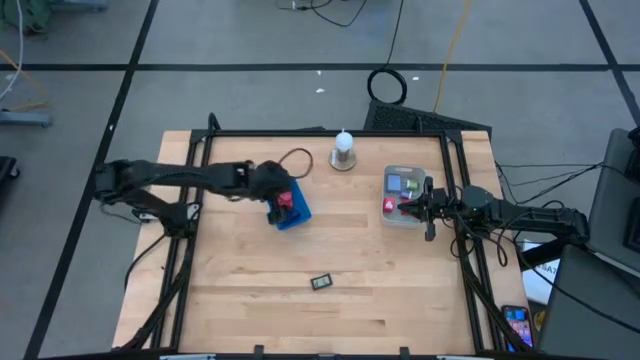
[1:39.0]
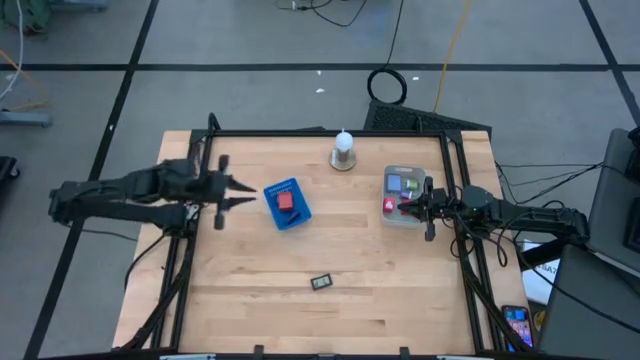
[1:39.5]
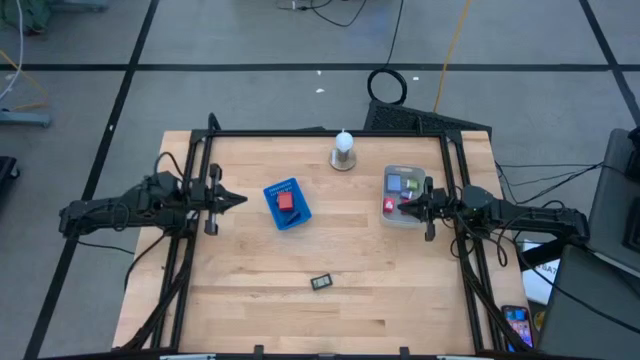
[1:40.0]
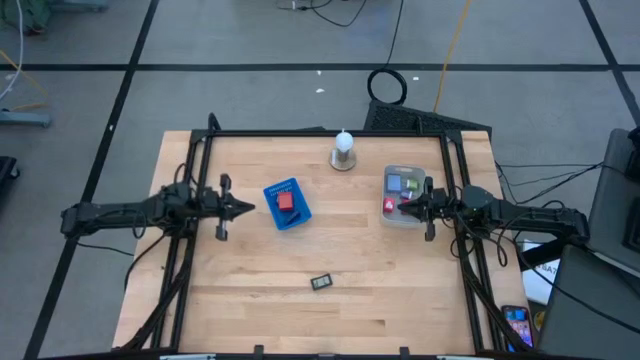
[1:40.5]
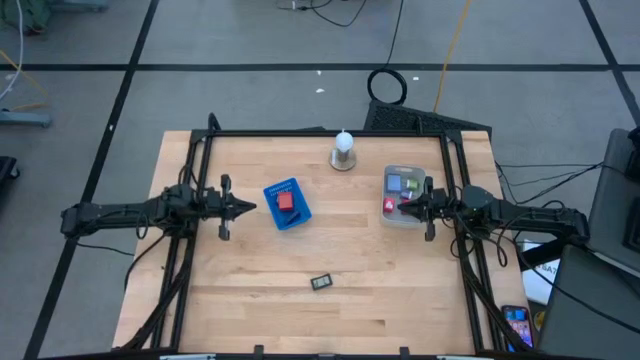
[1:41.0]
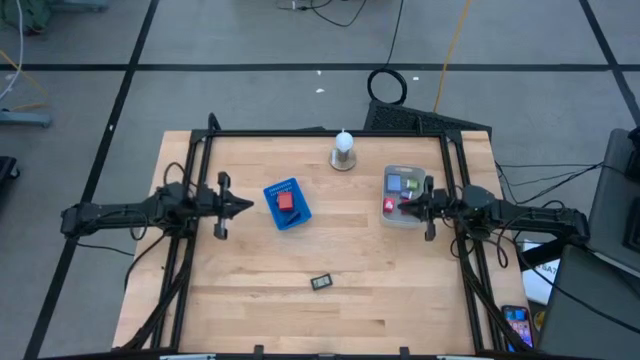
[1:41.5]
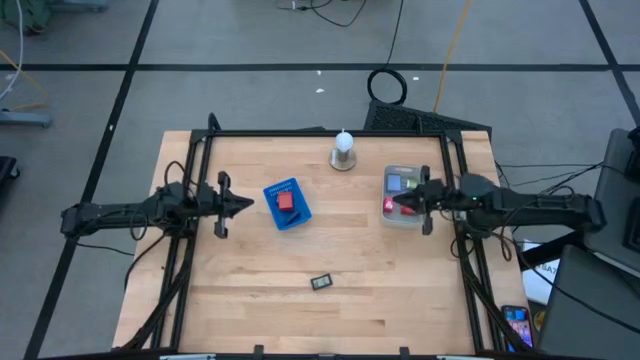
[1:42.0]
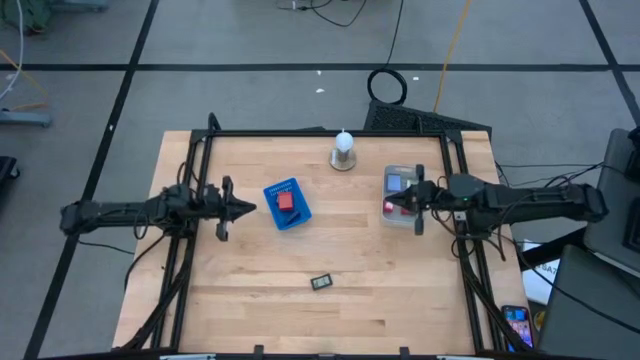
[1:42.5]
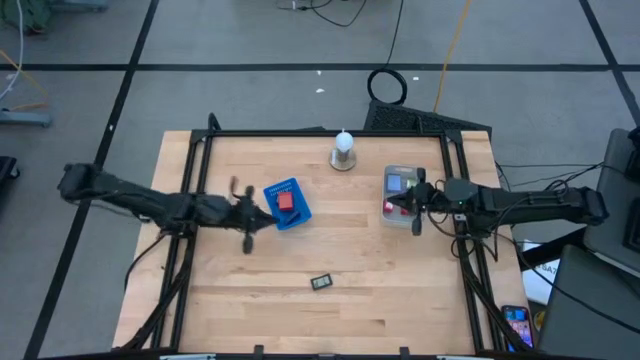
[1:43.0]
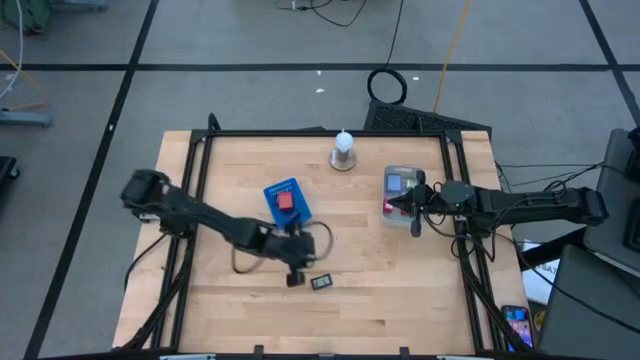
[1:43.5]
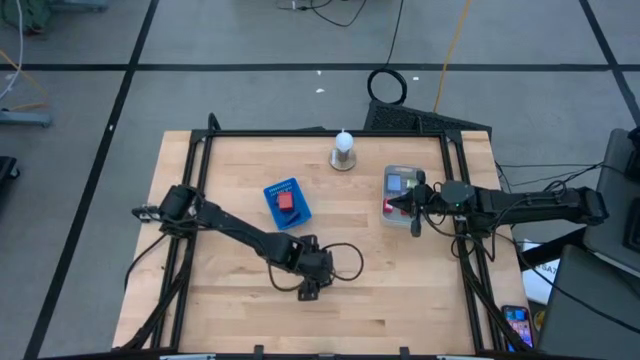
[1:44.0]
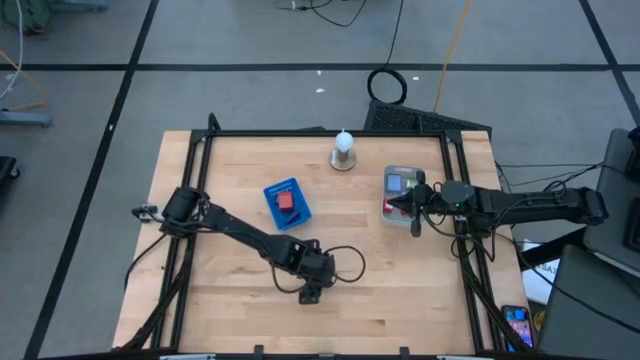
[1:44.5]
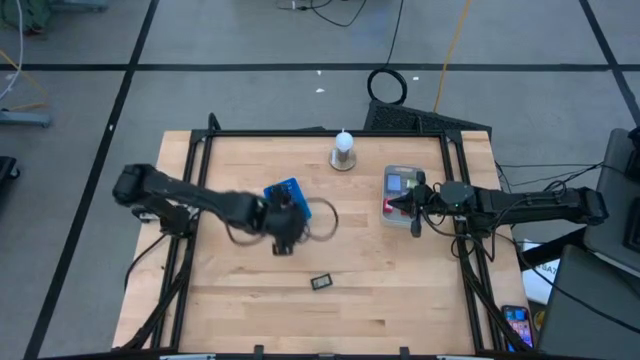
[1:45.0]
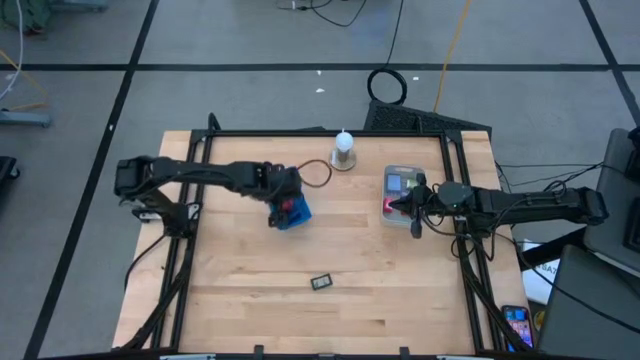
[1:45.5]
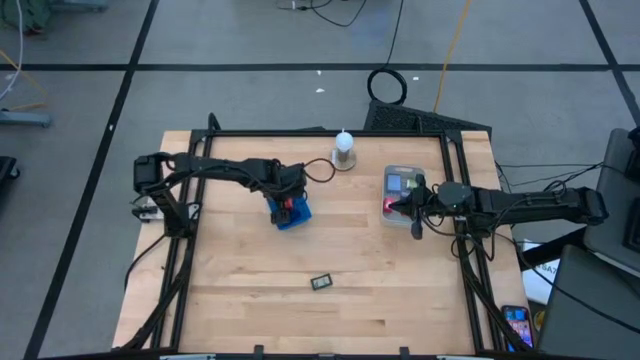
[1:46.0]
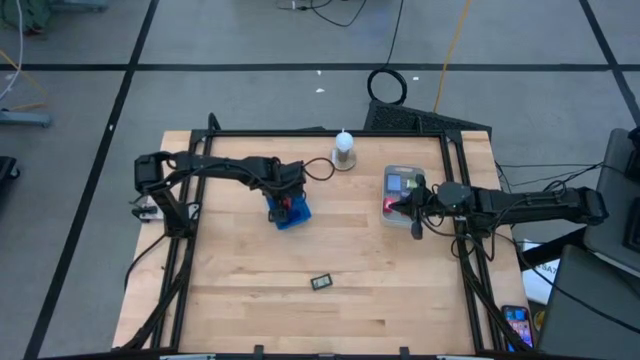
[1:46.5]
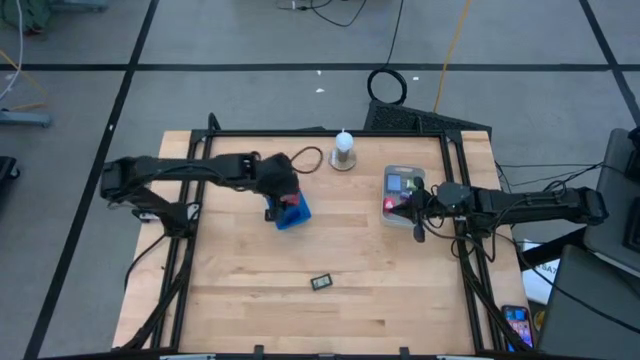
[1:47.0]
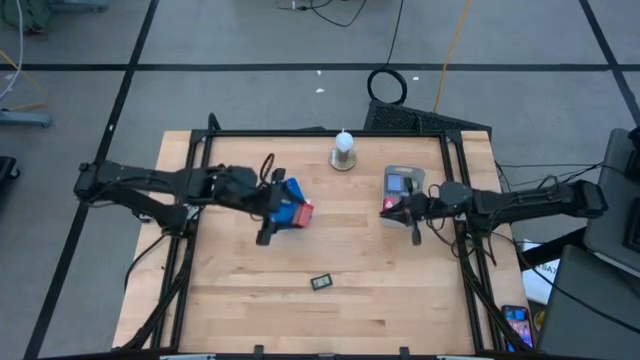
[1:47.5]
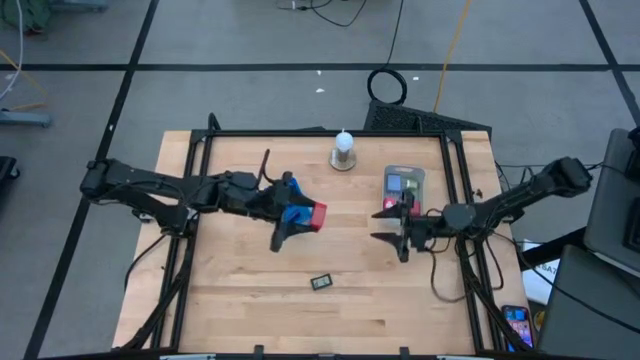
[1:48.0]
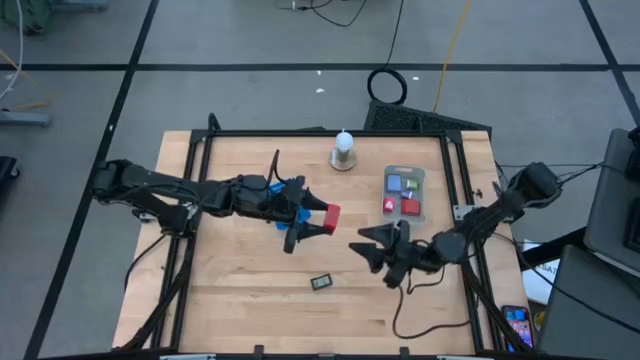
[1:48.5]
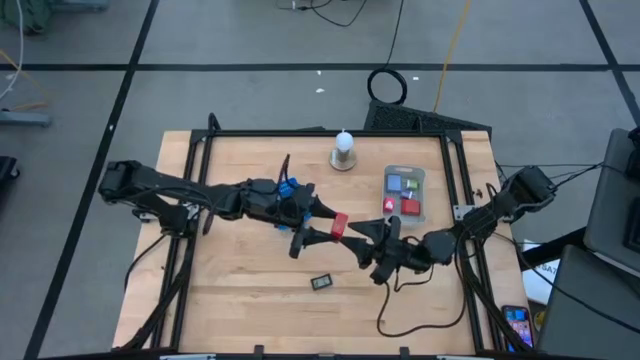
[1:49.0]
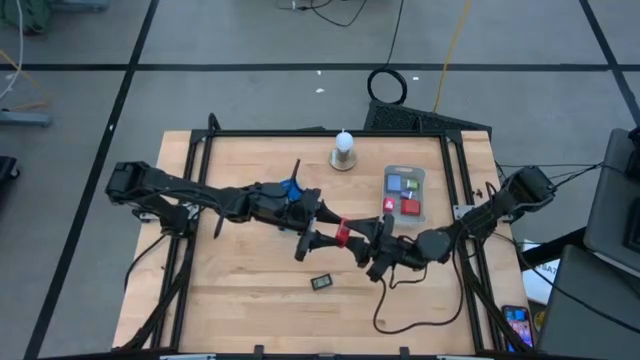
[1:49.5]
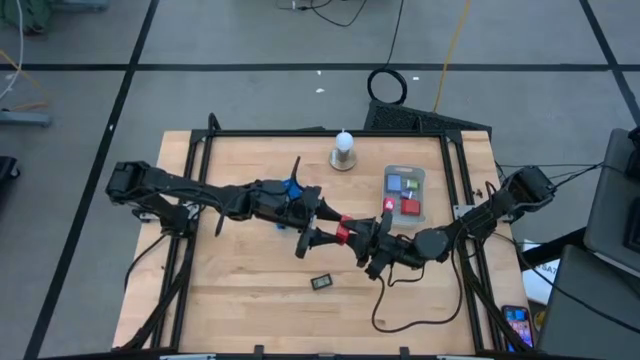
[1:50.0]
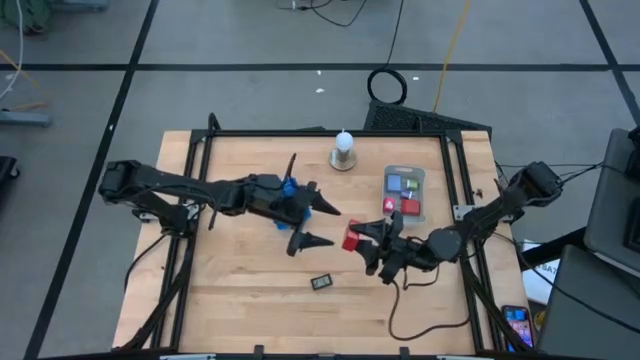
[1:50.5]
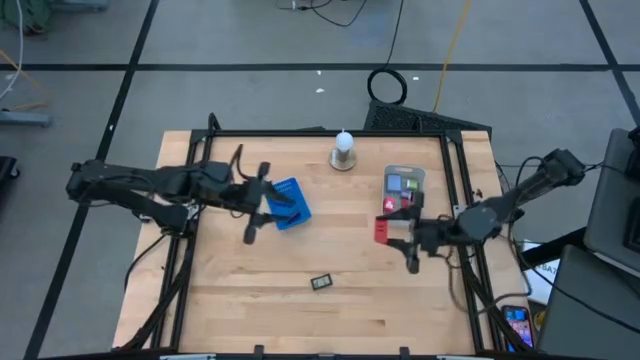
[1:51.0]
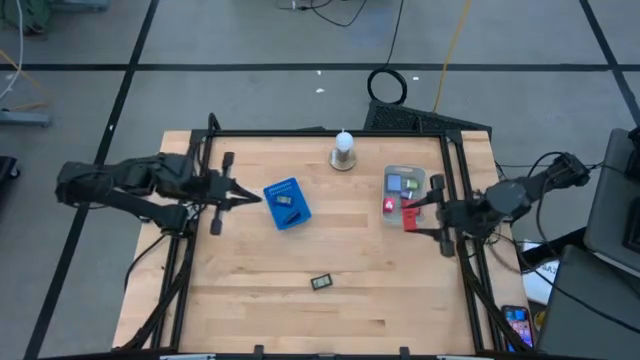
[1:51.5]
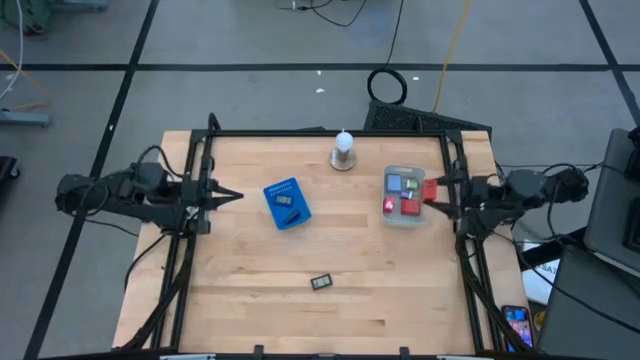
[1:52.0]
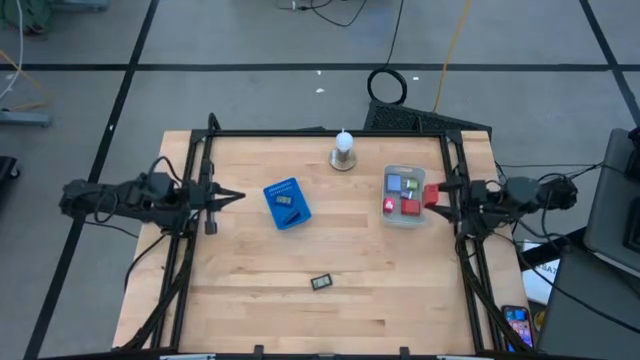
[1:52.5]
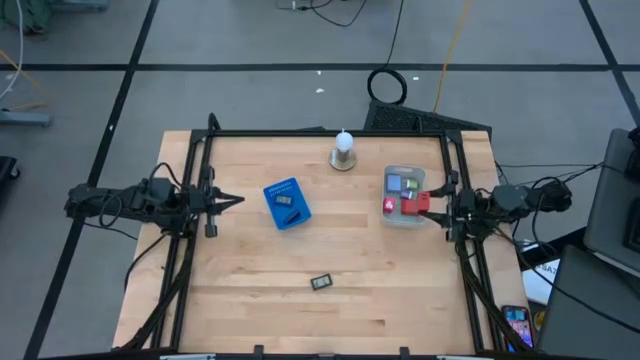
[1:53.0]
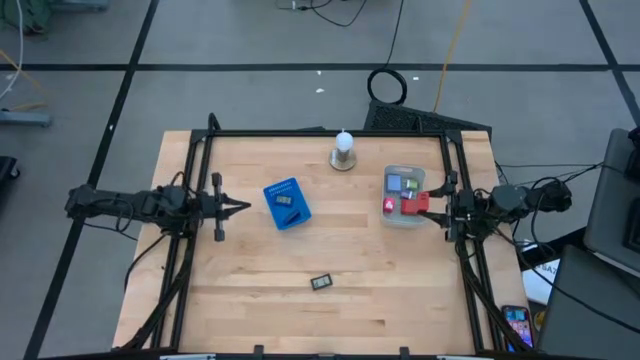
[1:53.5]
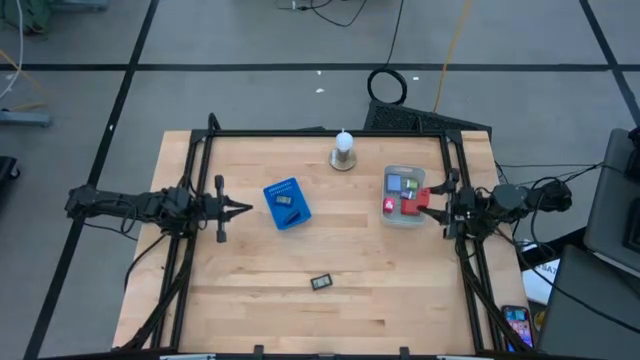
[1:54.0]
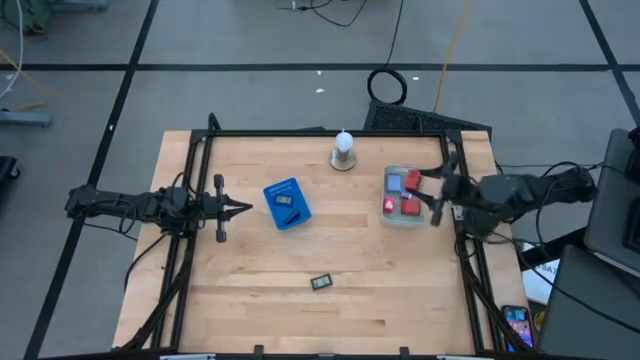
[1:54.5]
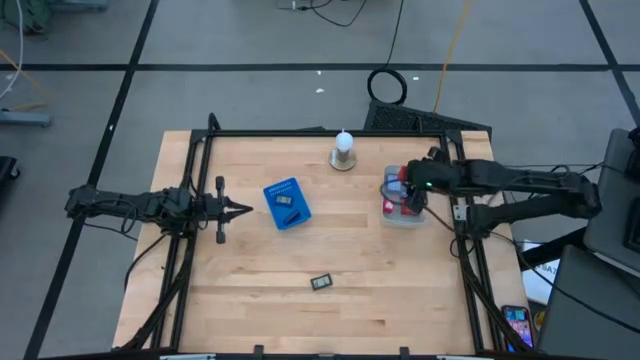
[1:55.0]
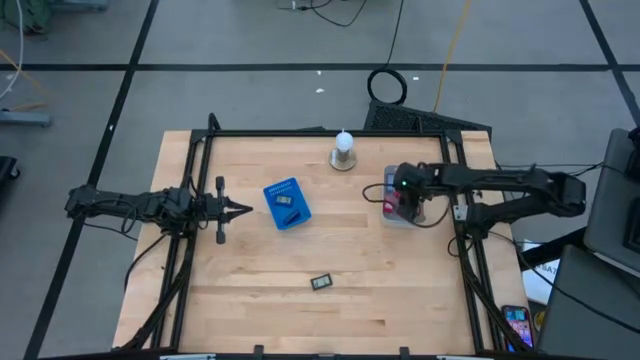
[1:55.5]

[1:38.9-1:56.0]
Task: Pick & Place Office items
Put the red charger adapter into the gray bin

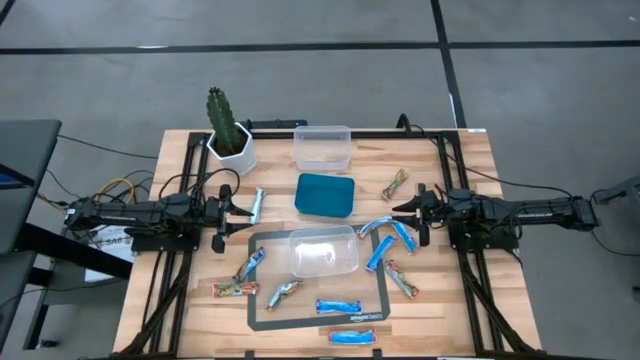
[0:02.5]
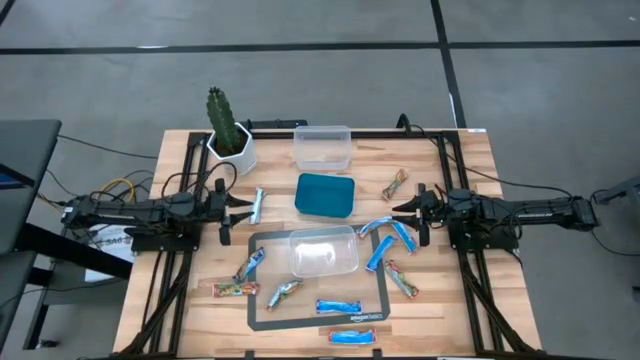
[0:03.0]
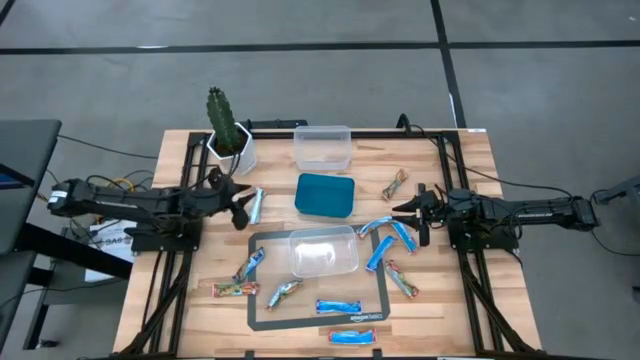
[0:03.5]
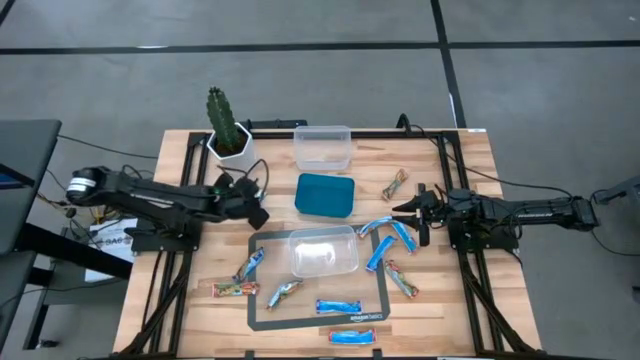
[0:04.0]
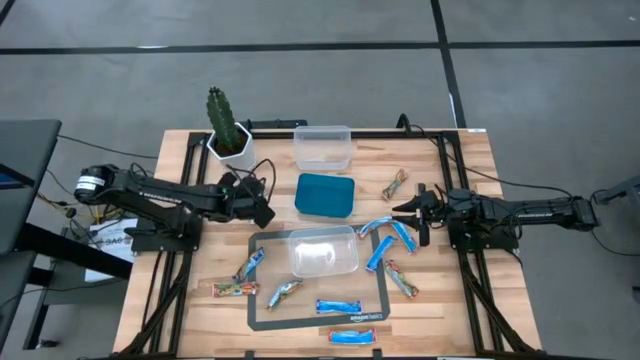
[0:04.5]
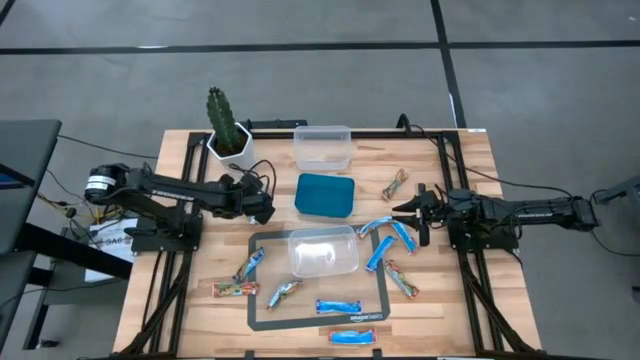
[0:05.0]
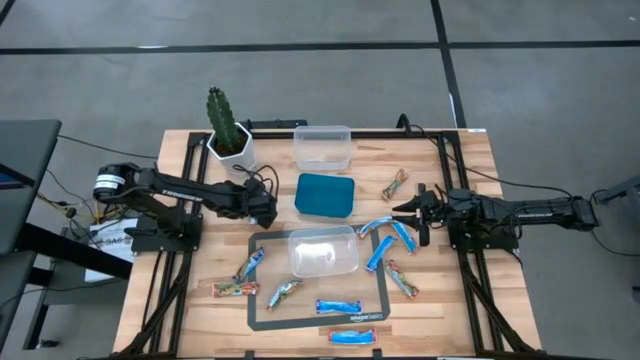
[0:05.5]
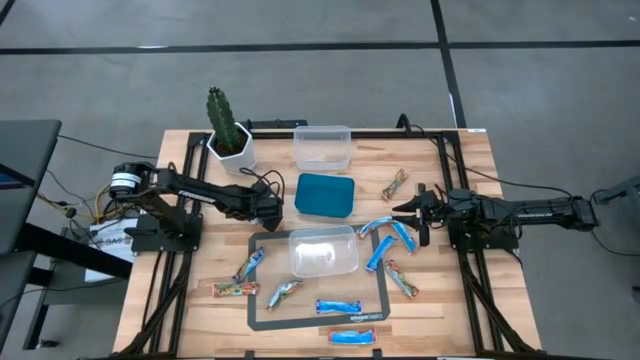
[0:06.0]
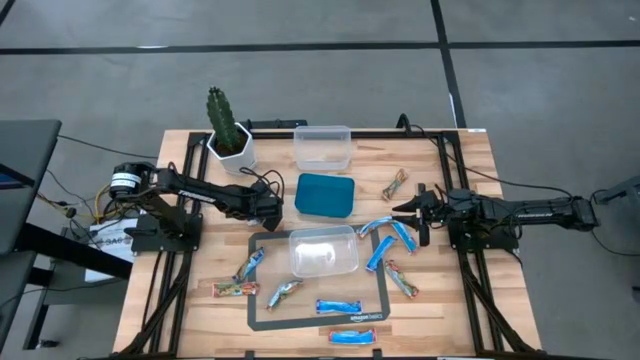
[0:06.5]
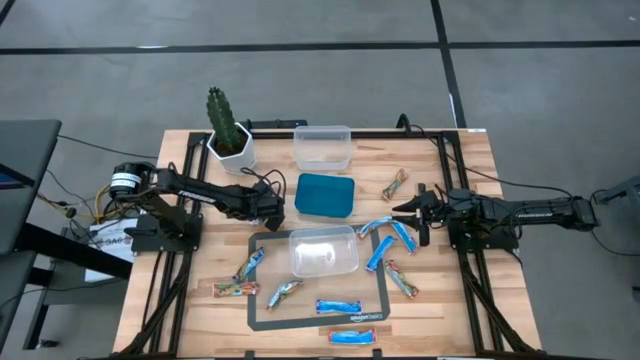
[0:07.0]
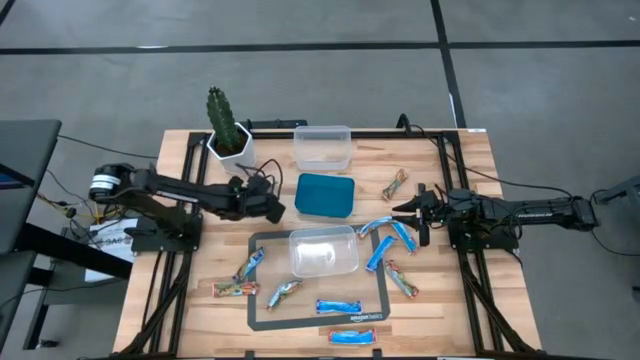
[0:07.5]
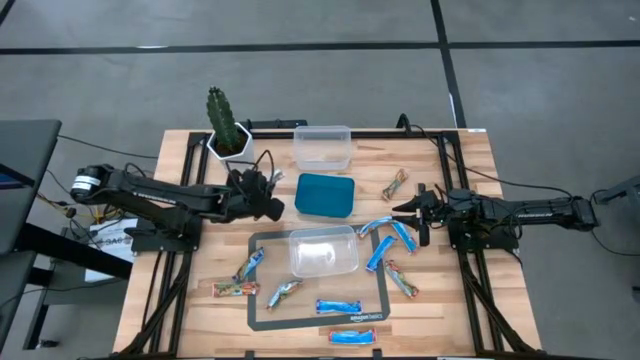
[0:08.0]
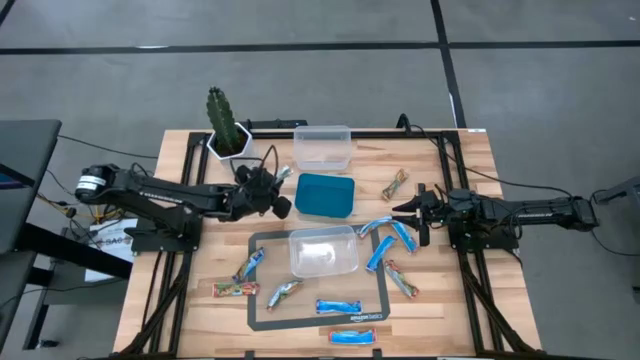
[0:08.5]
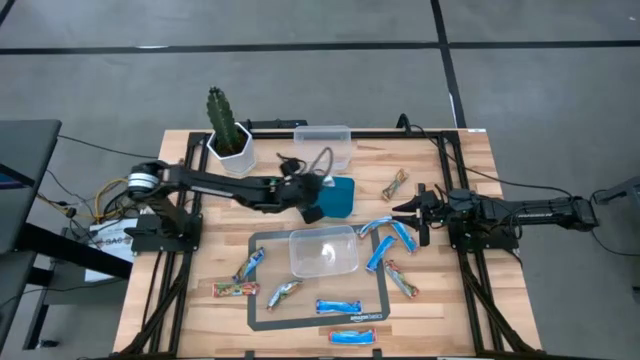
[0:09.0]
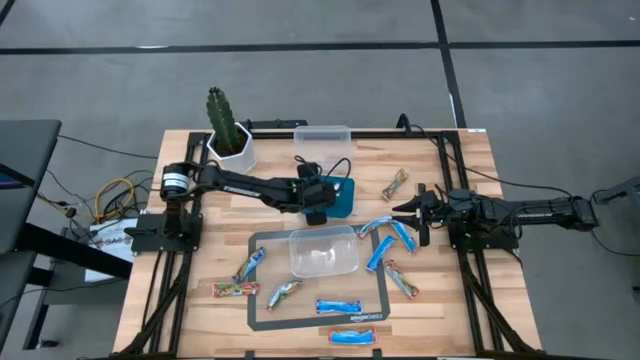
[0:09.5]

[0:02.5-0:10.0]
Task: Pick and place Granola Bars by type
Put the yellow granola bar into the blue bin
